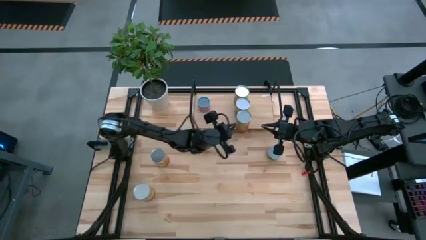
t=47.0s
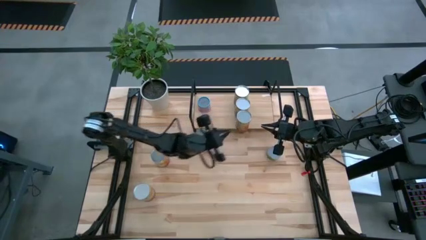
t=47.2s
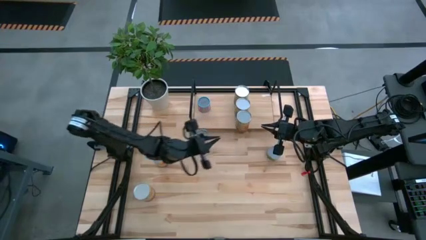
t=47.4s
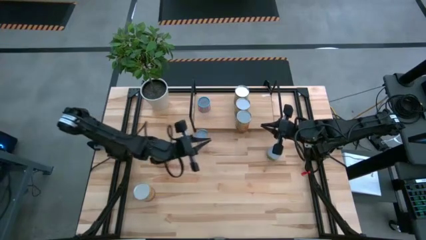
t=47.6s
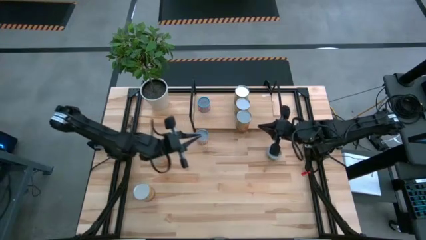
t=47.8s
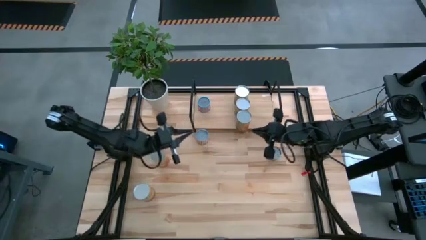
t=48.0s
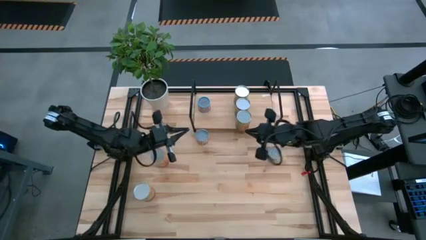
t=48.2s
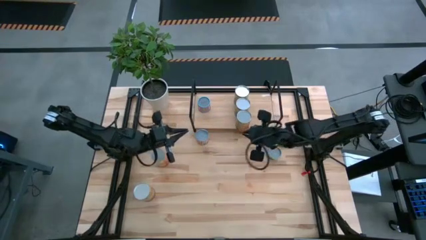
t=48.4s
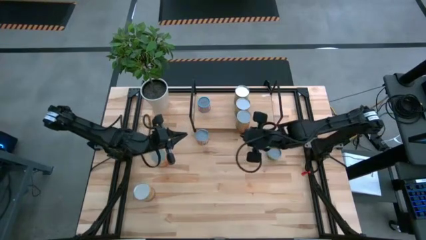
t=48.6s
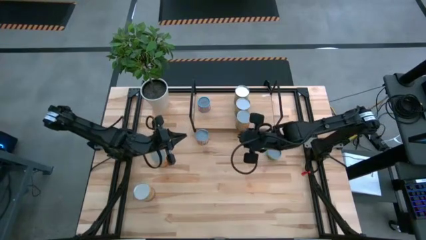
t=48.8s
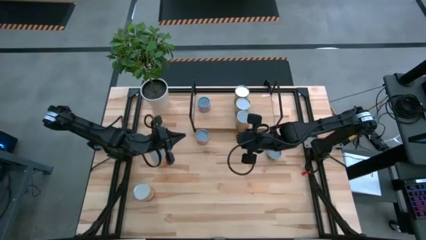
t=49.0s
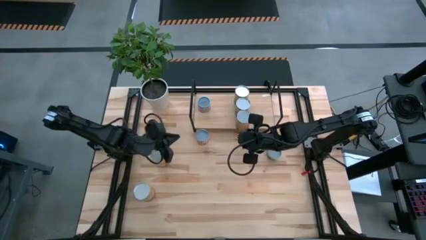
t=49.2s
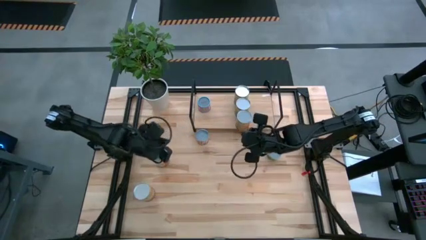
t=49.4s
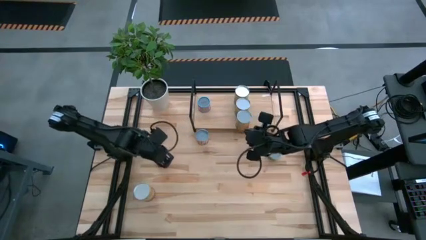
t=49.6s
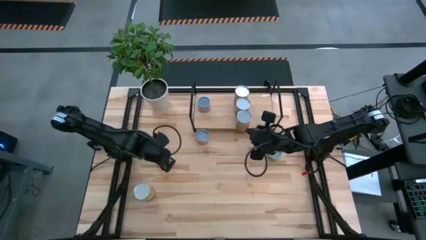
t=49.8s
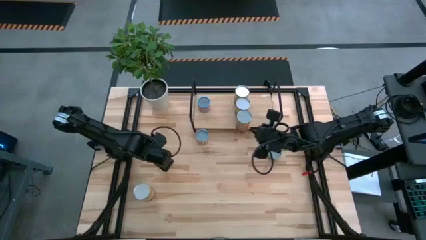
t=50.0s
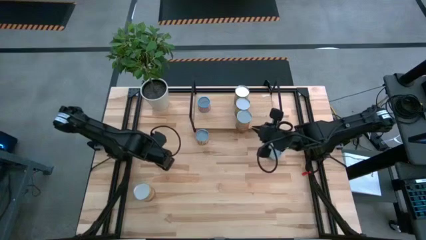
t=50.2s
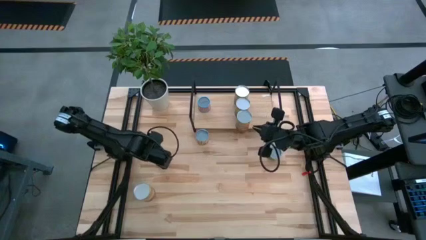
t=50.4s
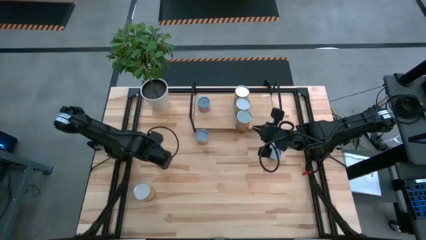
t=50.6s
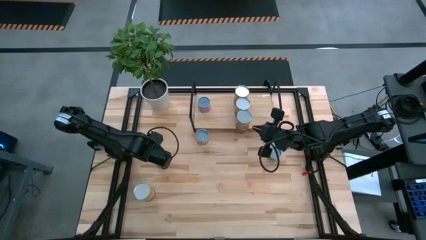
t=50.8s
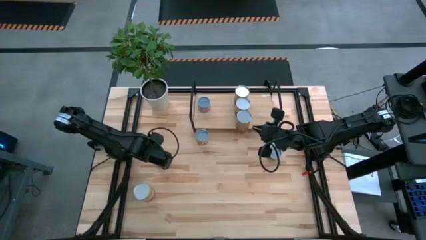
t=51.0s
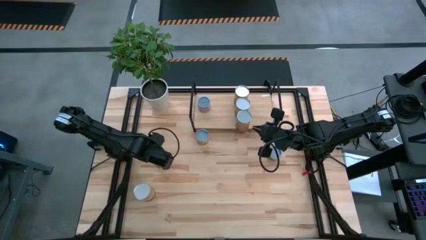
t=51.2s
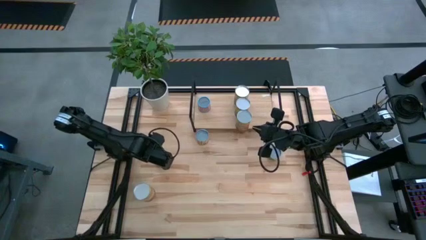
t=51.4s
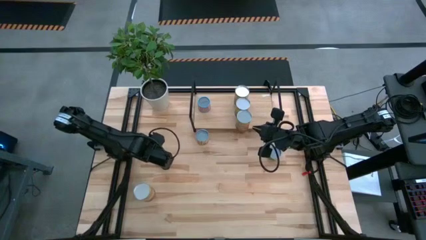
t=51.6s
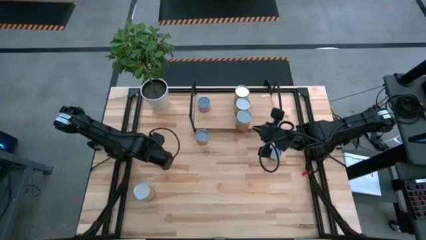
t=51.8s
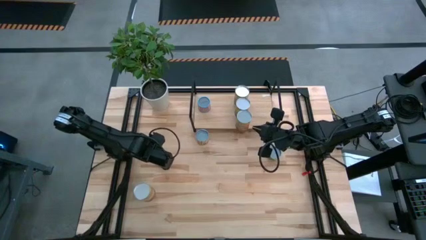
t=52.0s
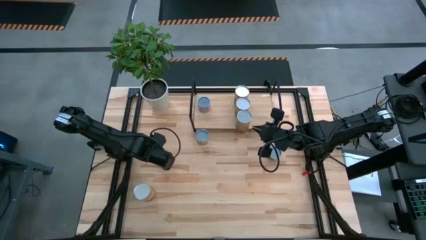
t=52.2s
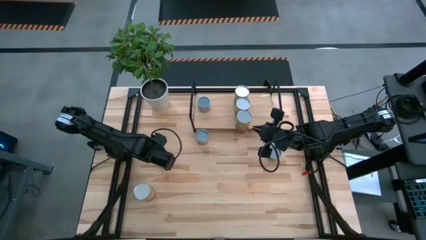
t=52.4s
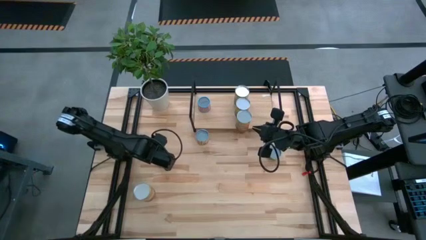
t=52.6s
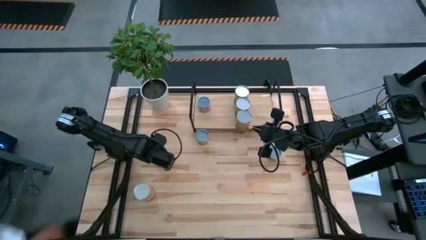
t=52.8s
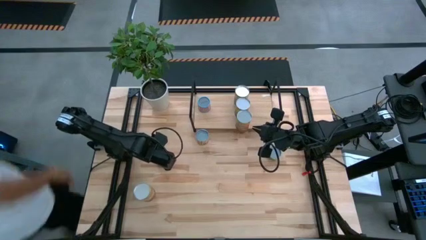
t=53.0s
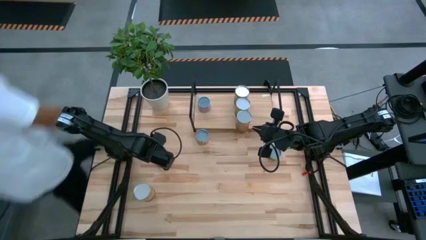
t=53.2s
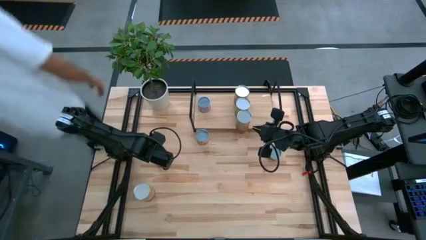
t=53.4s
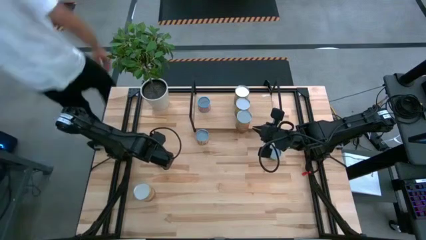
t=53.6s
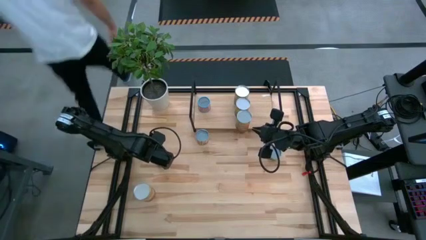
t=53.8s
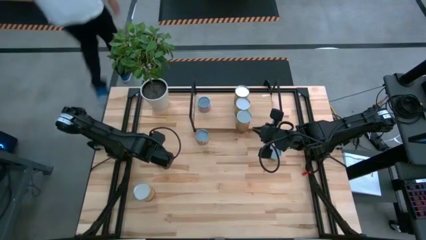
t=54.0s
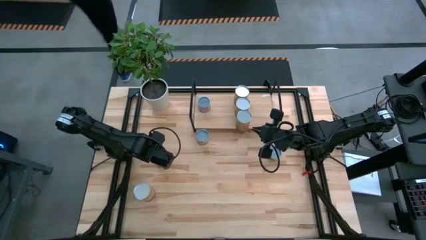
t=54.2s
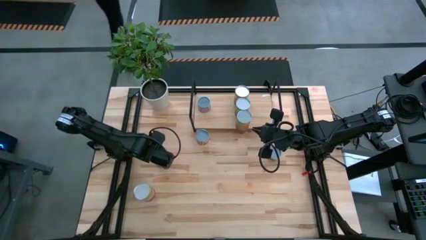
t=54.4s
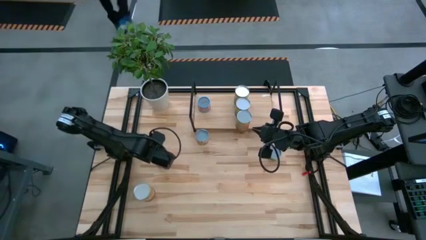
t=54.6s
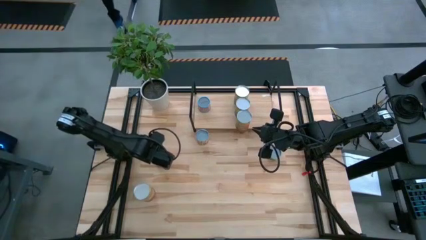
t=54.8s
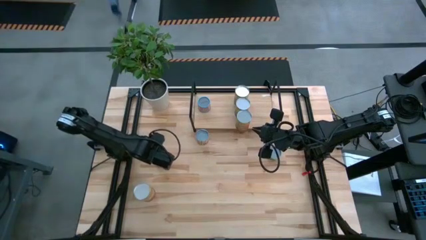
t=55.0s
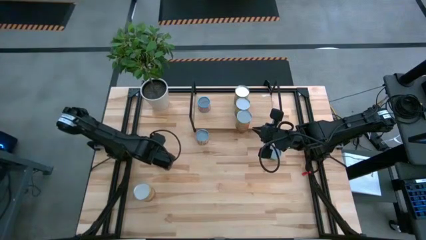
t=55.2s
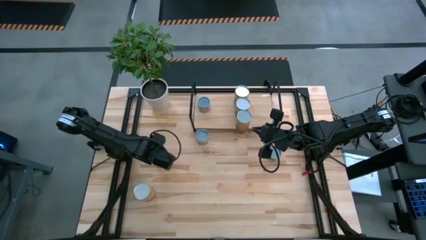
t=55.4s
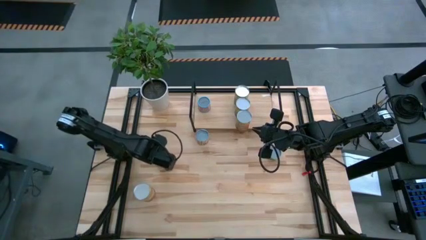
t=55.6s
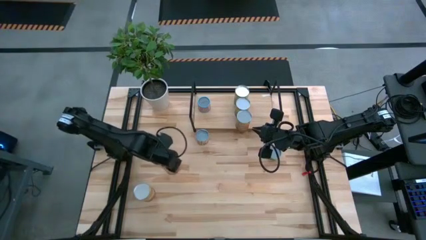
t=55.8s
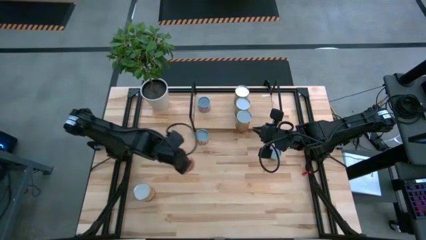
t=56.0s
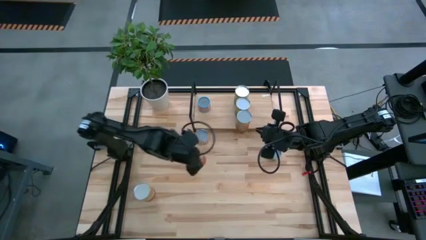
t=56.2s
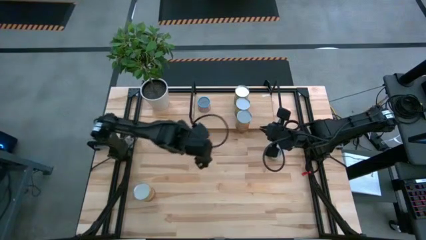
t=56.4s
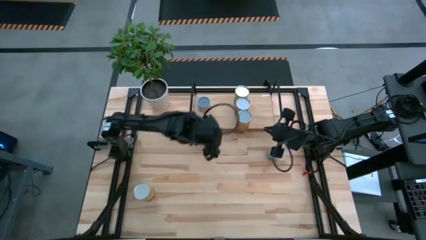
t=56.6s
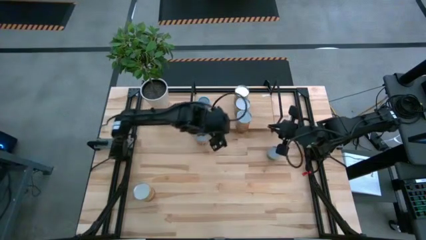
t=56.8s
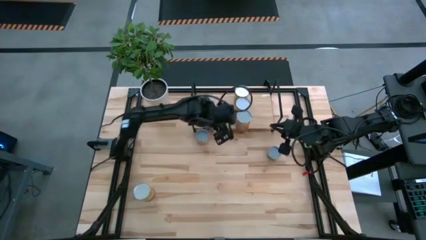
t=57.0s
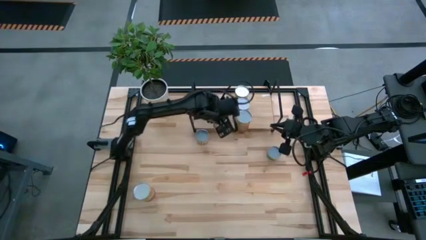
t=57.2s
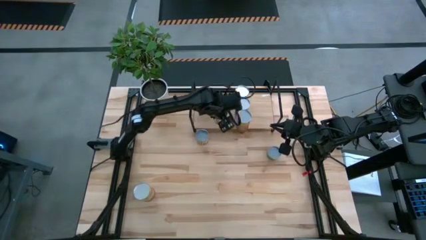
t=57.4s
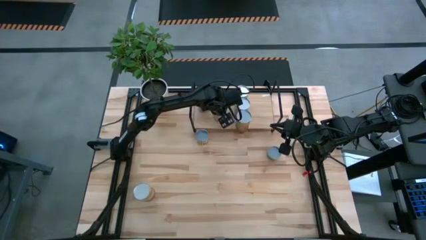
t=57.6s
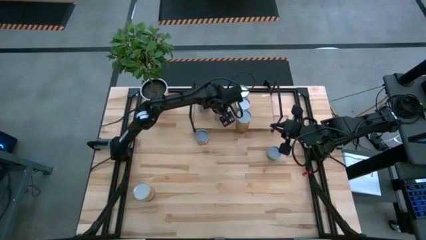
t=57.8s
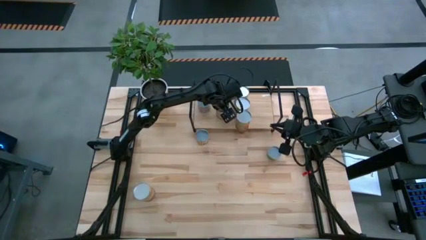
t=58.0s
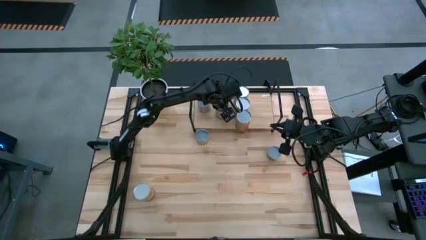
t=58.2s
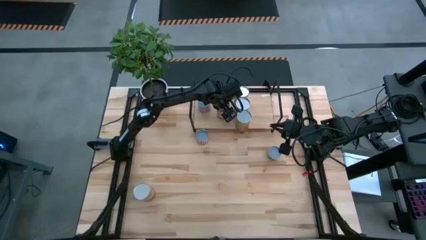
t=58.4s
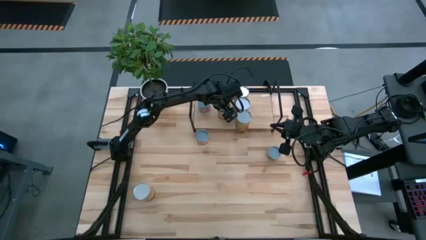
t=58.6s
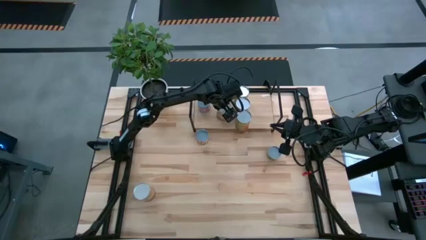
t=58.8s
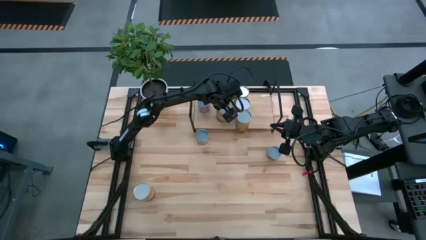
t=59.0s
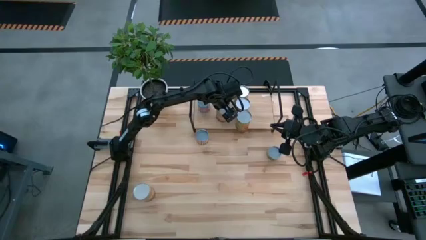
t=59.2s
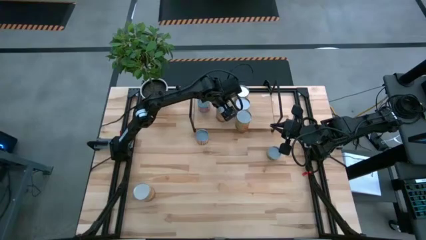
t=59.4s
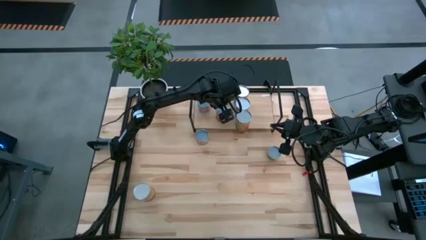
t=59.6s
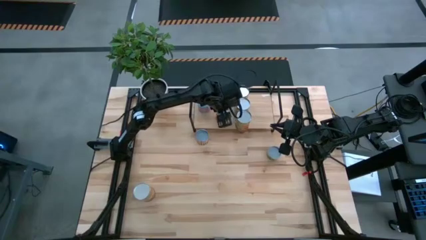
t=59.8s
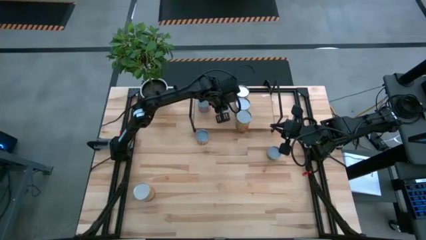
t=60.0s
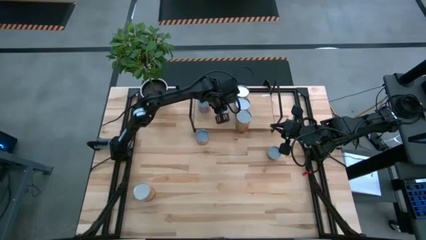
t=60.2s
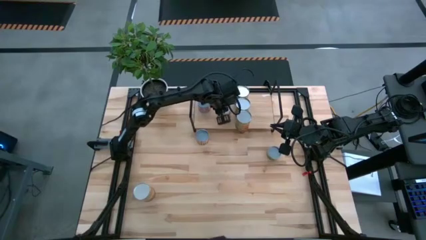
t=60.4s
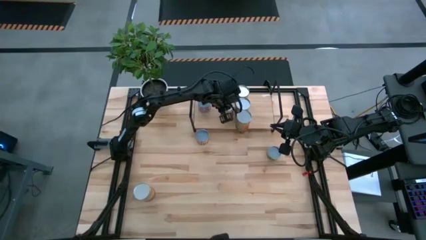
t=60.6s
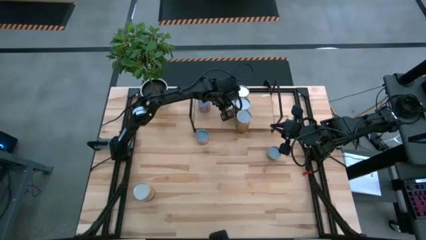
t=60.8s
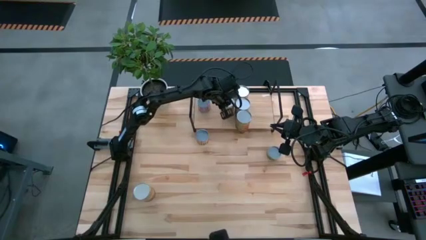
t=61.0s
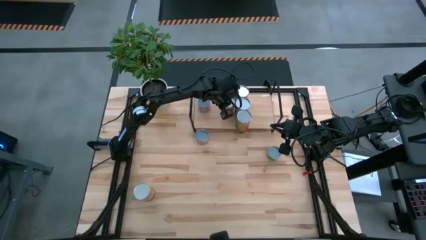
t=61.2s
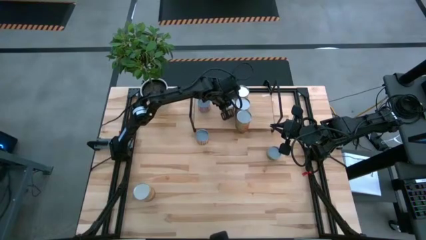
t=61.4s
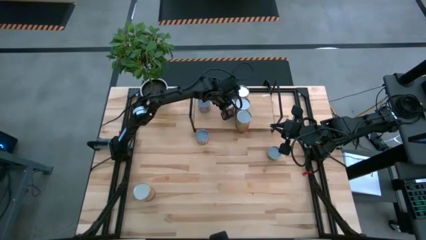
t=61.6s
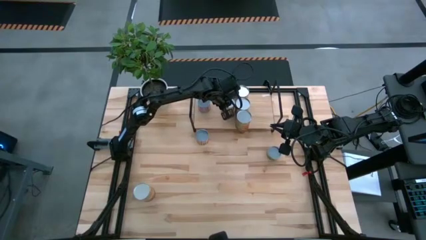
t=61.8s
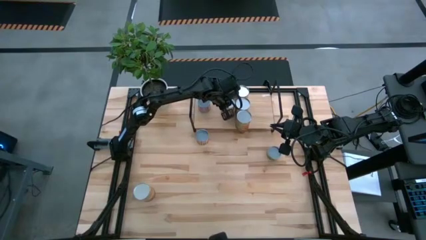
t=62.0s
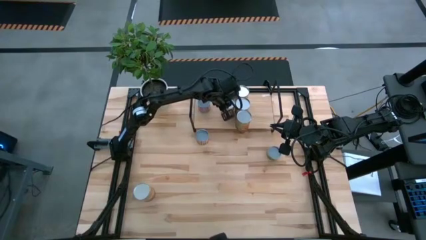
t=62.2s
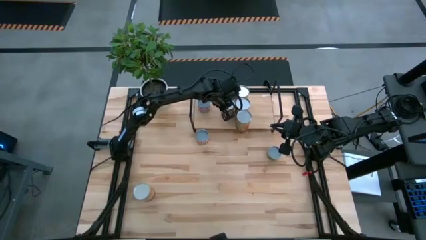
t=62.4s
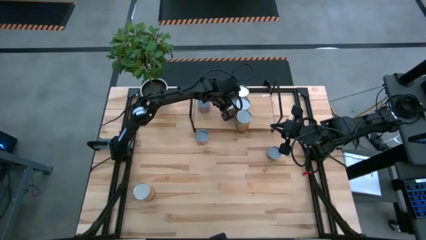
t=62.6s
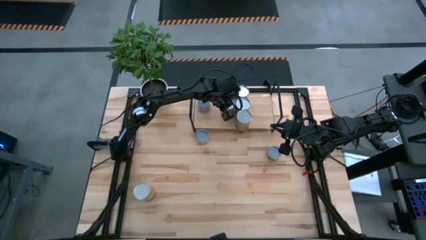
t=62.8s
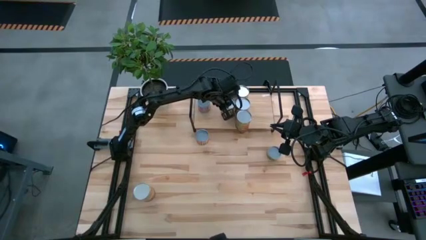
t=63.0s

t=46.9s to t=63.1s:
Task: Pick and place cans onto a shelf
Put the top canned corn on the shelf
